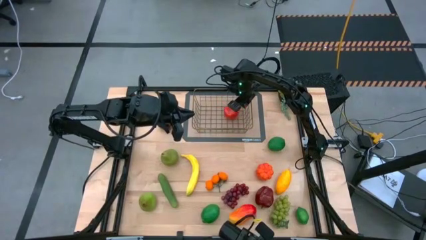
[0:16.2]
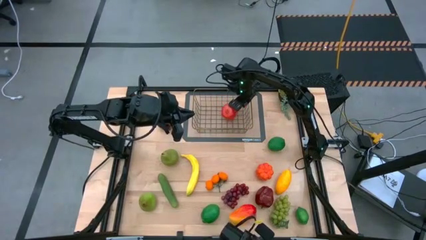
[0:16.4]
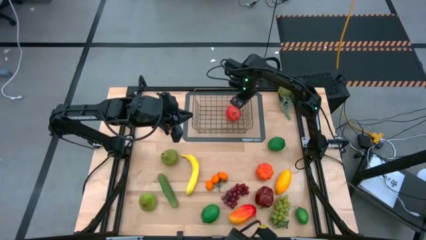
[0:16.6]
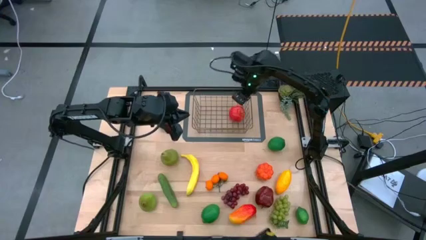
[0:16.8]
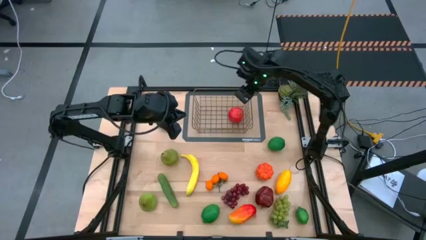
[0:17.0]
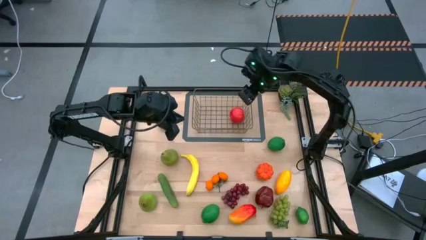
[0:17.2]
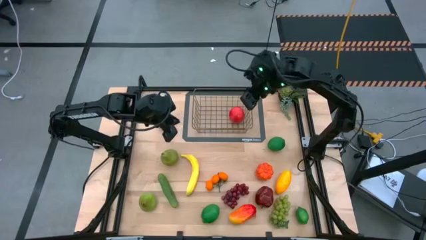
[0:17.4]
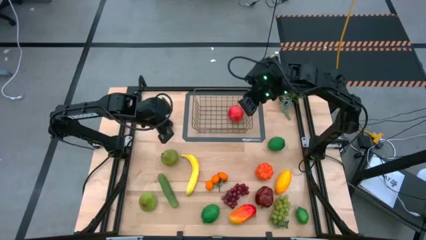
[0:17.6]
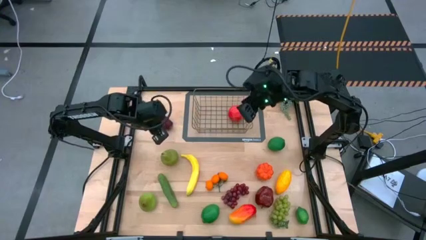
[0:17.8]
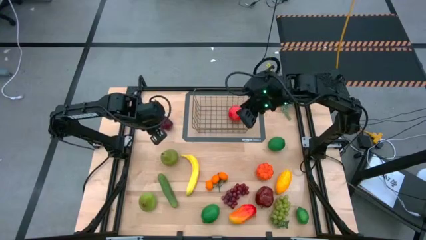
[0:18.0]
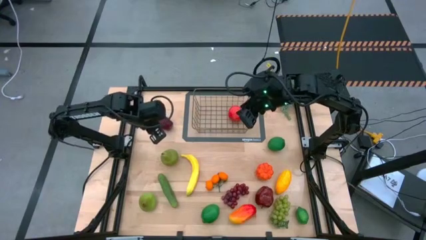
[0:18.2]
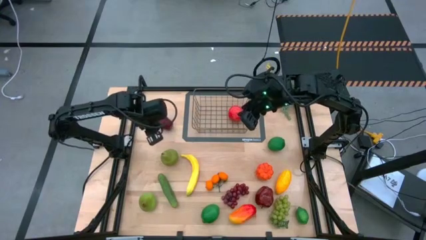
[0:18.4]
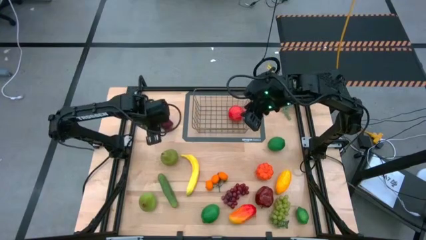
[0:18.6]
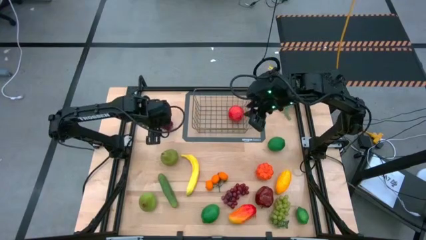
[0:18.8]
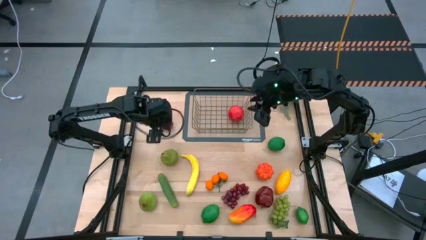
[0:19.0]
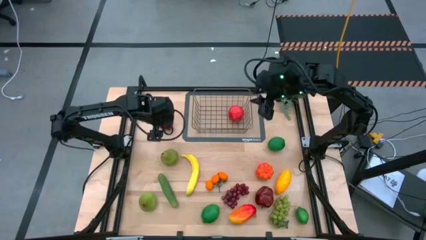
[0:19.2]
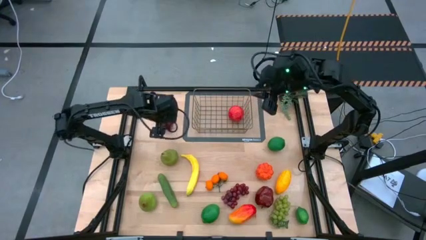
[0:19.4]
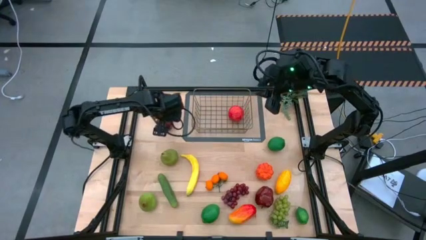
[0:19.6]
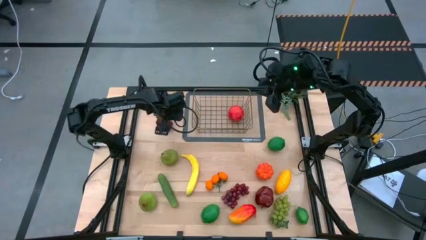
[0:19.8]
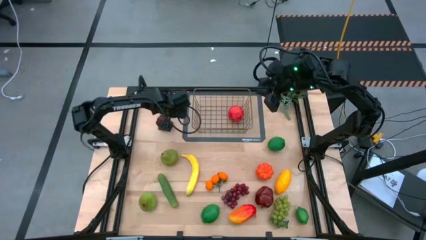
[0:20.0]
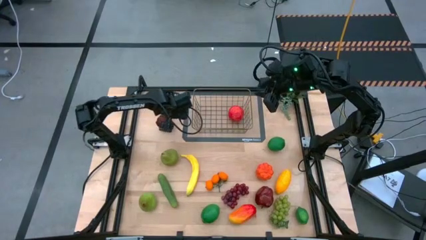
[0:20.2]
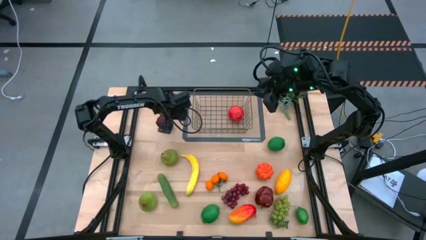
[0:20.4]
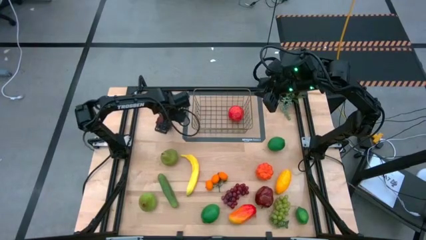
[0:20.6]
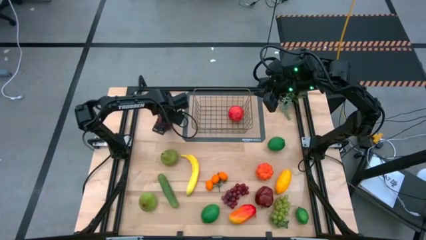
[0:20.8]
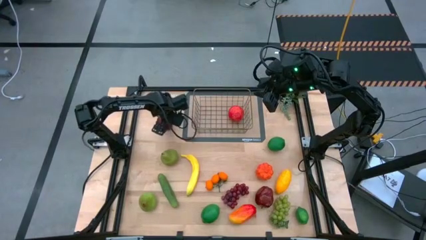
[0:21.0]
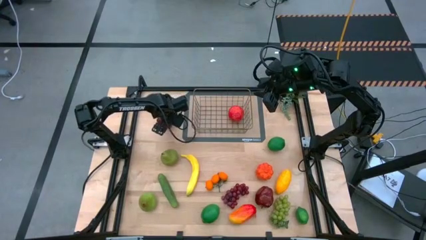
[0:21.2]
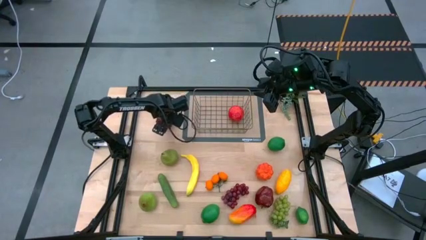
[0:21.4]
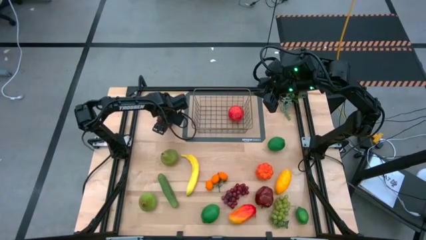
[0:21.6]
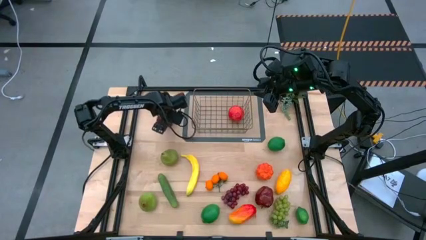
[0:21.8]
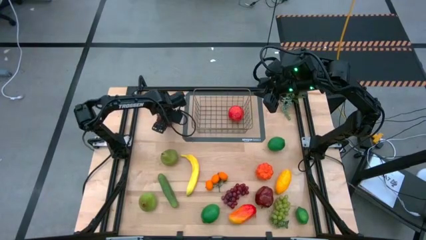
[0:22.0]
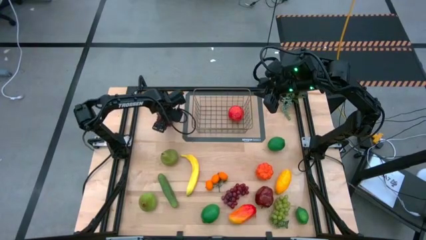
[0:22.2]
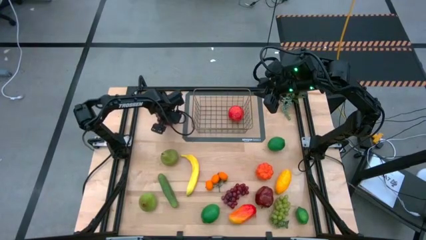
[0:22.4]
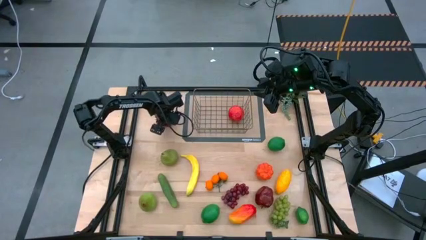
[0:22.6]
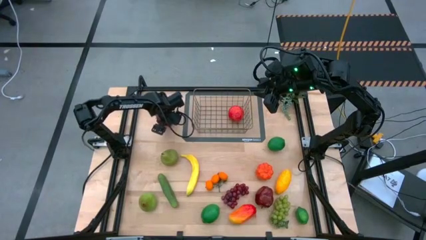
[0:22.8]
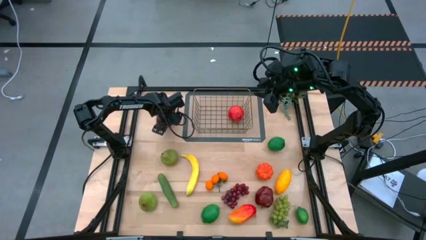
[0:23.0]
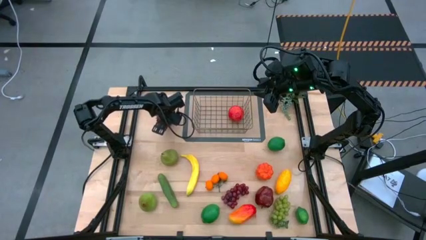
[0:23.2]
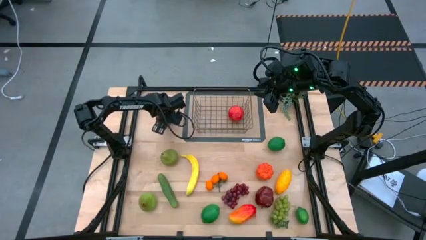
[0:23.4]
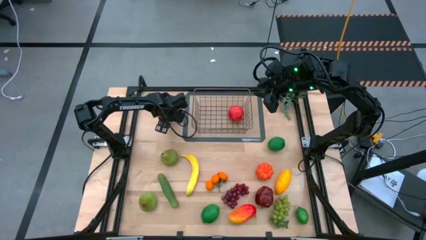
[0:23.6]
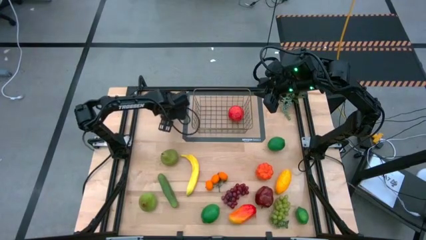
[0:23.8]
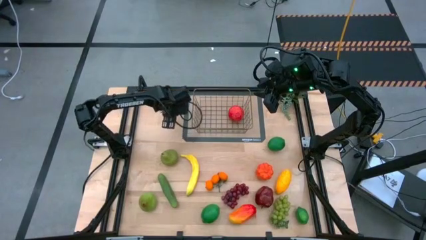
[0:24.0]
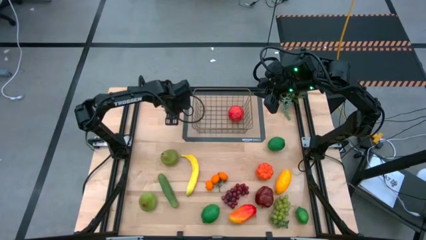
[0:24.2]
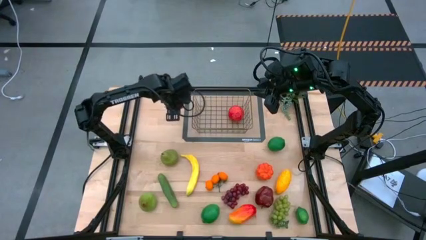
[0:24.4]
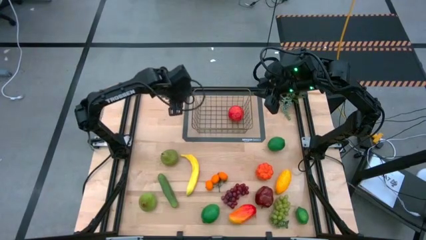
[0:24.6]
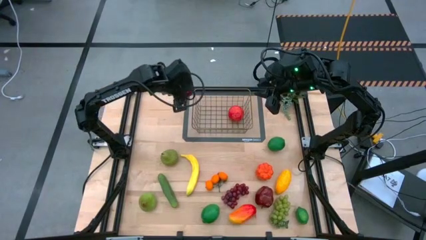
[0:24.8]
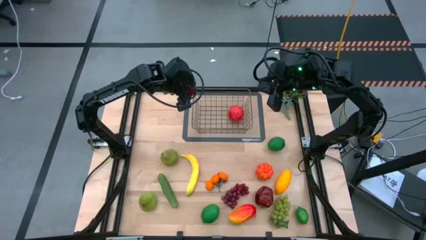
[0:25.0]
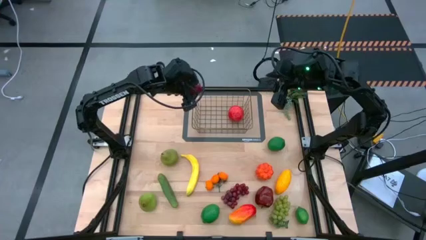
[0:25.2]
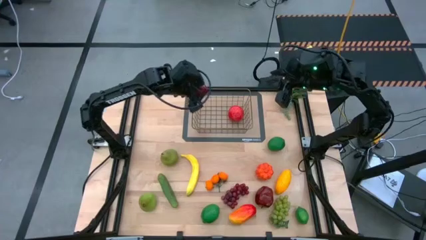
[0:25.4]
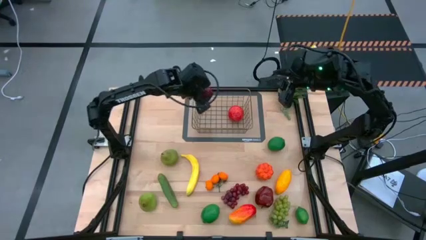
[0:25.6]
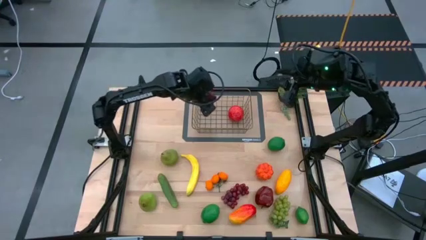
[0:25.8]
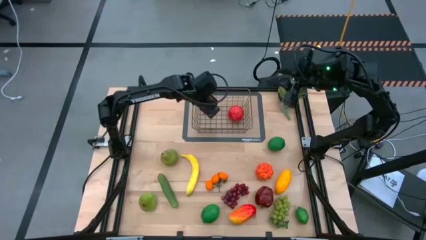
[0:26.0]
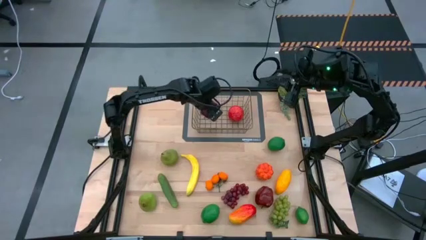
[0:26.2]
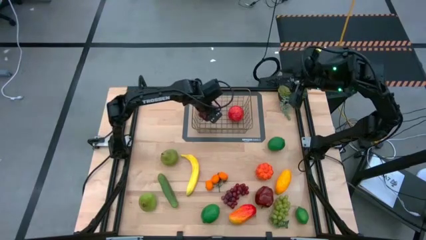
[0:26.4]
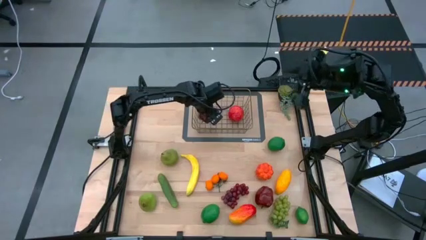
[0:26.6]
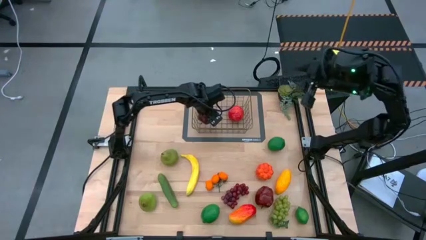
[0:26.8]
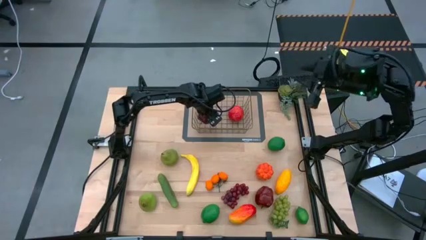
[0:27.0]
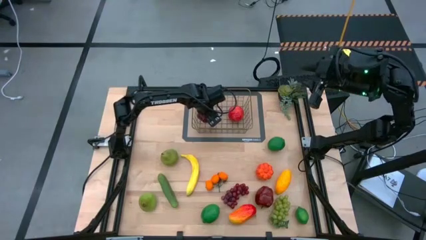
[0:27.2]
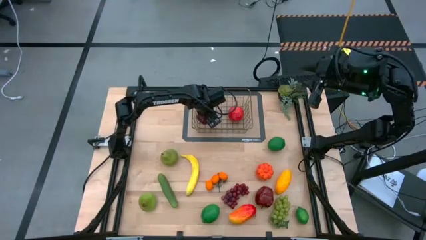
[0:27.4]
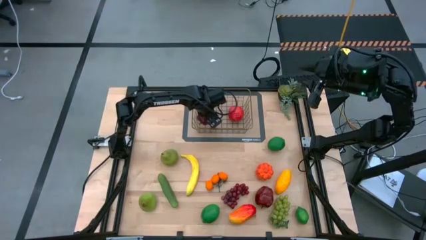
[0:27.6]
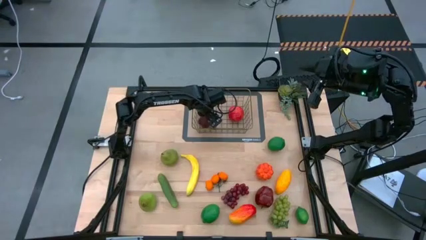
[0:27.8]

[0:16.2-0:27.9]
Task: Build produce basket
Put the top dark red apple into the brown wire basket

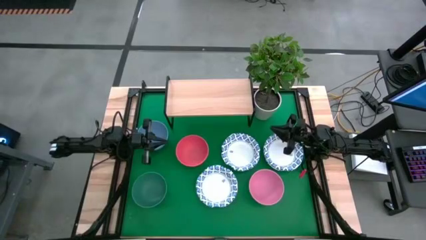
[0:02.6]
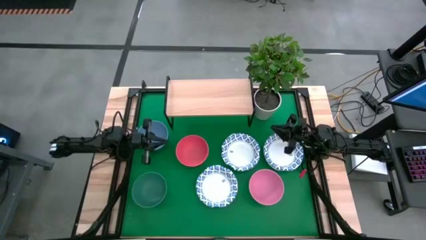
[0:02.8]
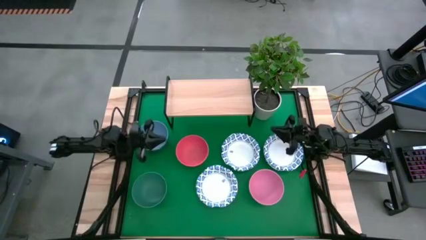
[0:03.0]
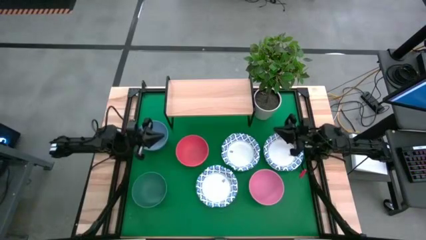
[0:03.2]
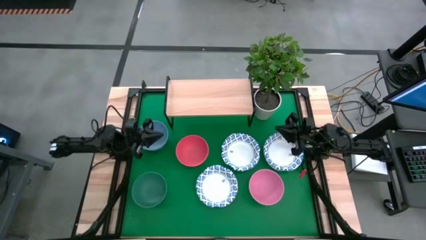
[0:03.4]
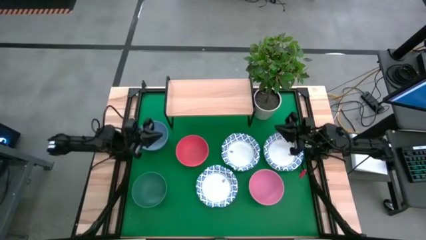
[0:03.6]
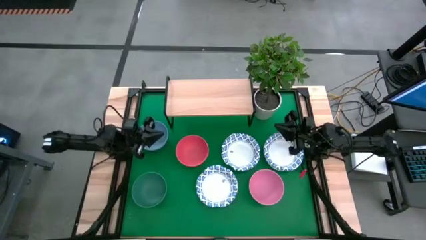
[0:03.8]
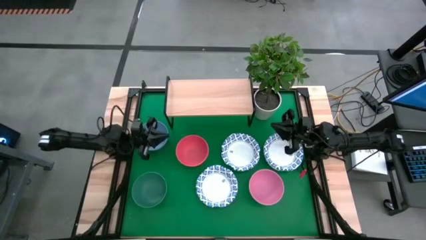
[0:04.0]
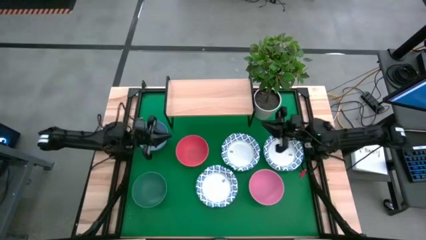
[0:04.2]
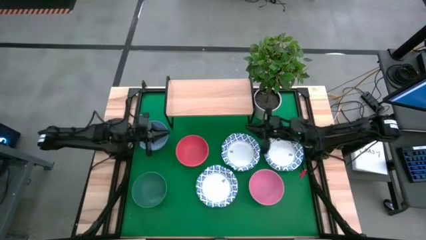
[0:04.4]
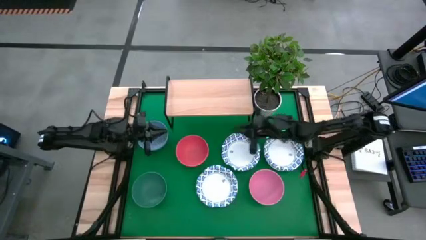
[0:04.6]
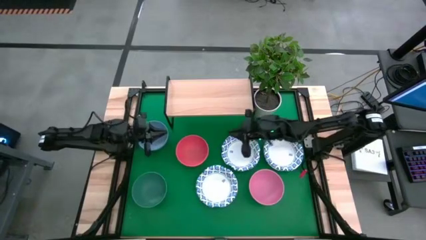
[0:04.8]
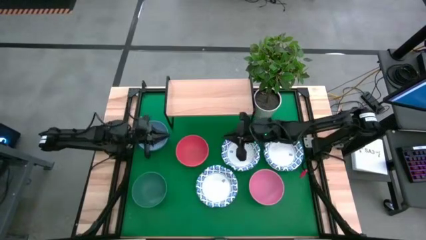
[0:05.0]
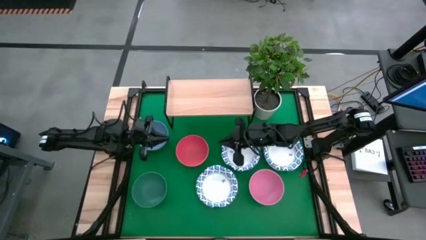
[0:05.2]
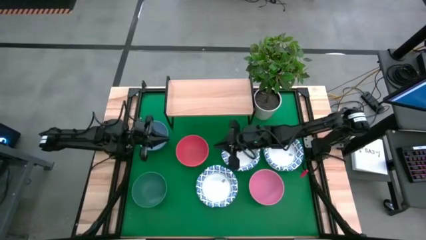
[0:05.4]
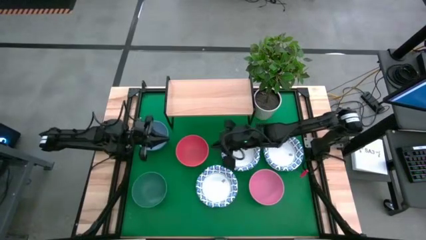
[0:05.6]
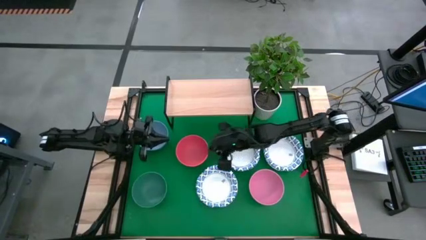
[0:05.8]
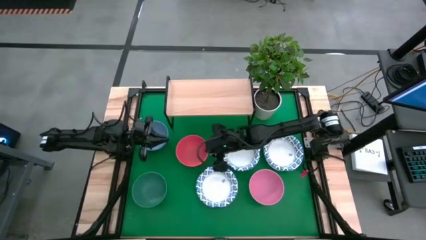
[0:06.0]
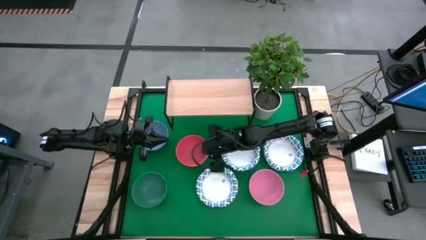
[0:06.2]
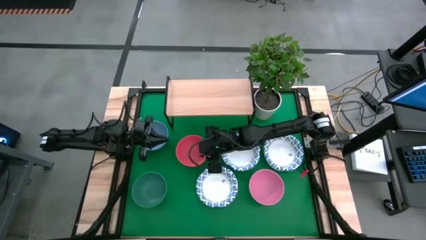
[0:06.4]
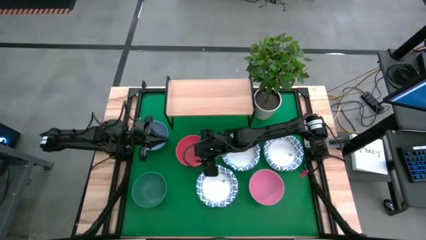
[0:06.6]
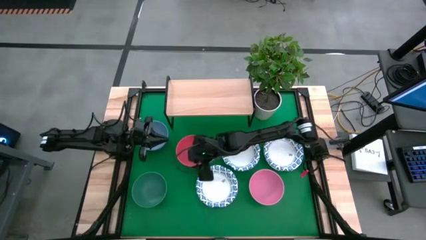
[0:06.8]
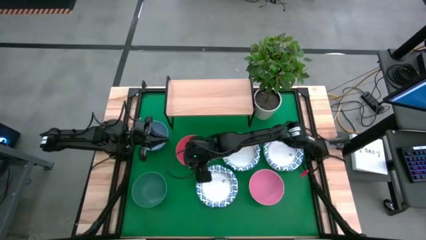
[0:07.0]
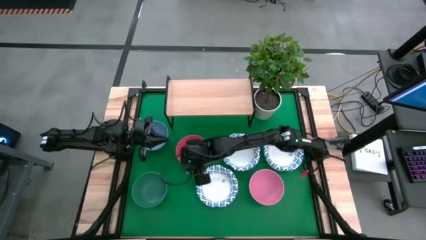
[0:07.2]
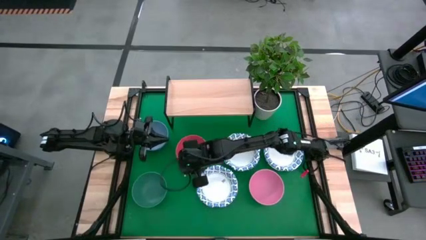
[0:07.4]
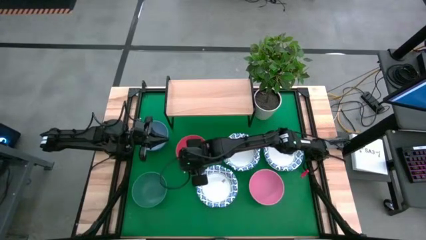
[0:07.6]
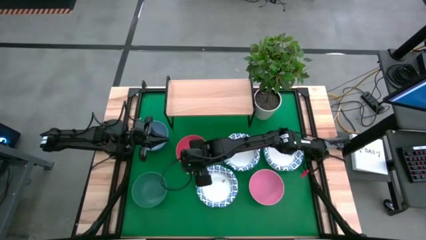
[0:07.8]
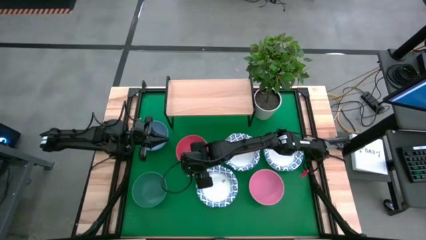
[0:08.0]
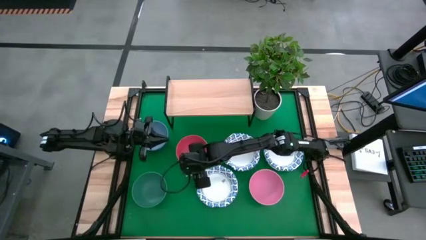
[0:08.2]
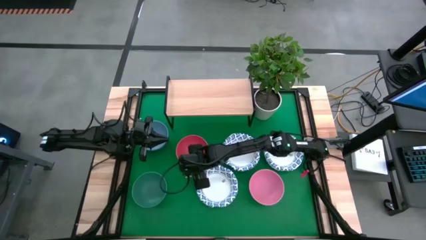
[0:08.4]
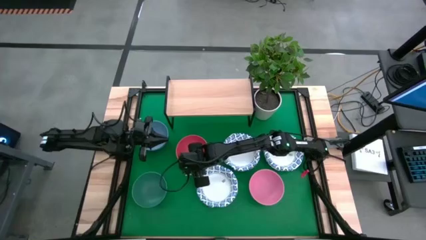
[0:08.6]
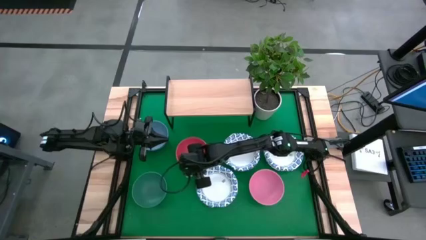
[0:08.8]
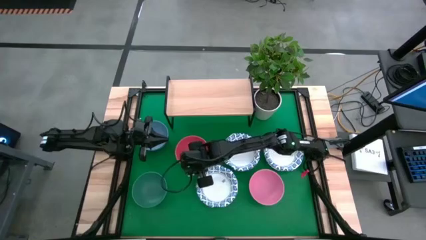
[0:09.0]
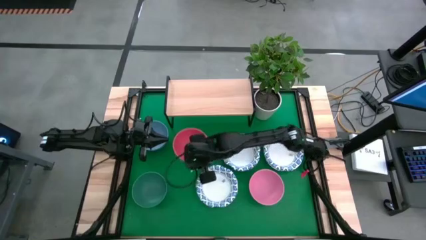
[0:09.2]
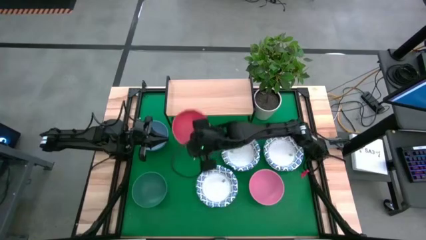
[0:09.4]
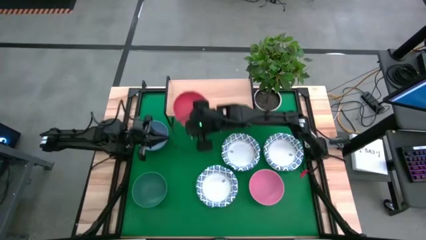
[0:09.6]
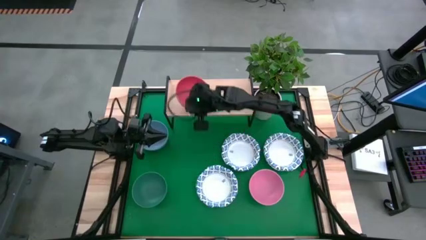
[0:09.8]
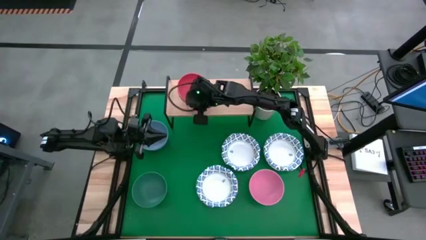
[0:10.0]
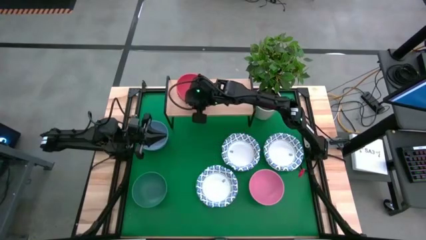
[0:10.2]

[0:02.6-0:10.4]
Task: Place and stack bowls onto a shelf
Put the orange bowl on the shelf
